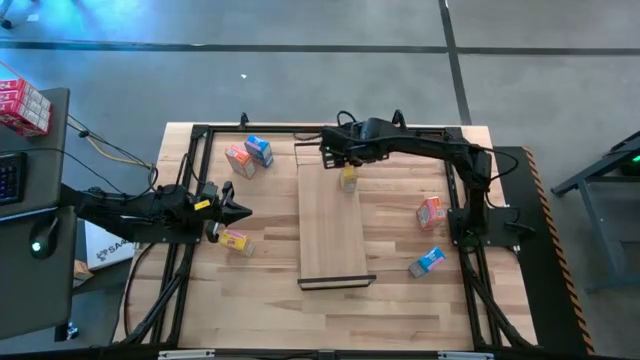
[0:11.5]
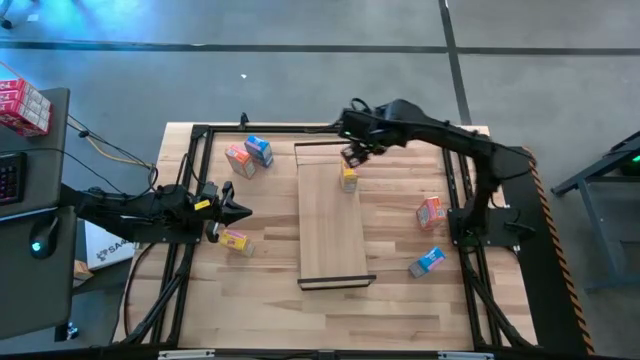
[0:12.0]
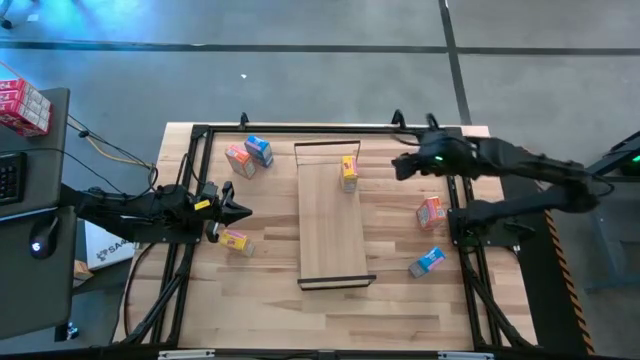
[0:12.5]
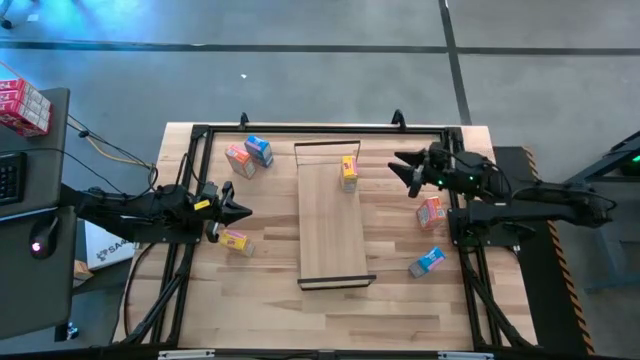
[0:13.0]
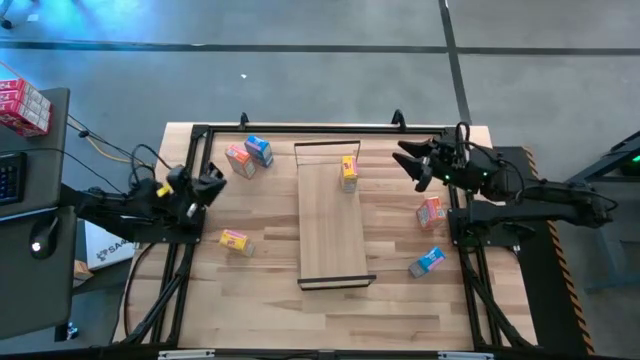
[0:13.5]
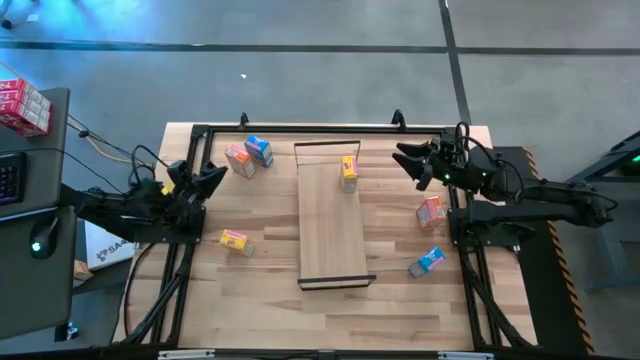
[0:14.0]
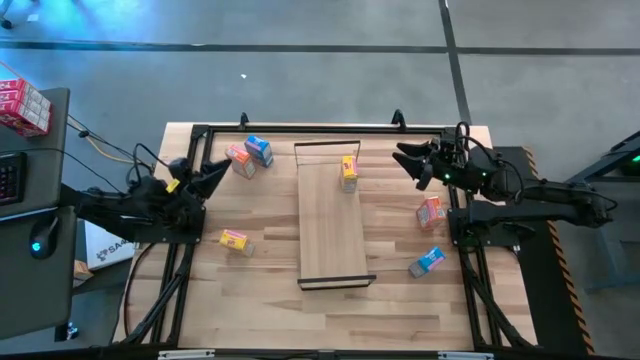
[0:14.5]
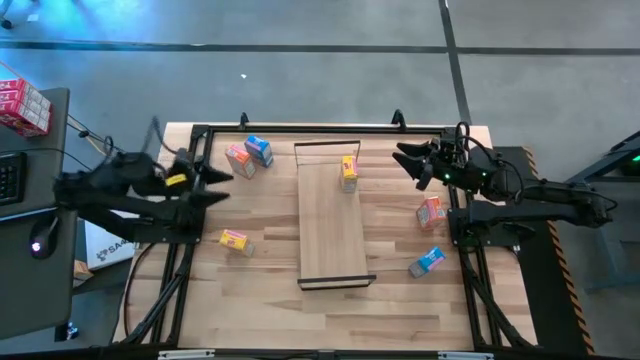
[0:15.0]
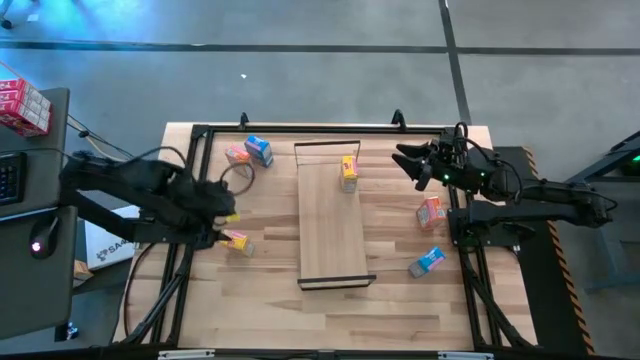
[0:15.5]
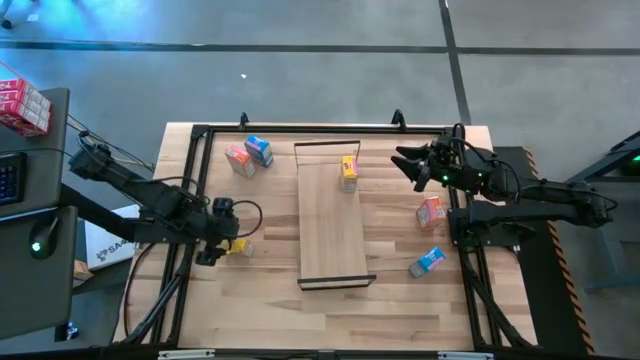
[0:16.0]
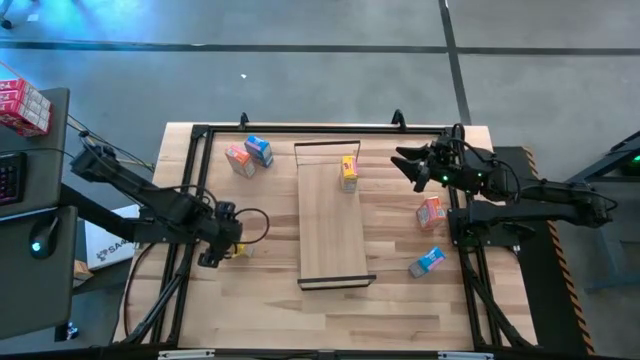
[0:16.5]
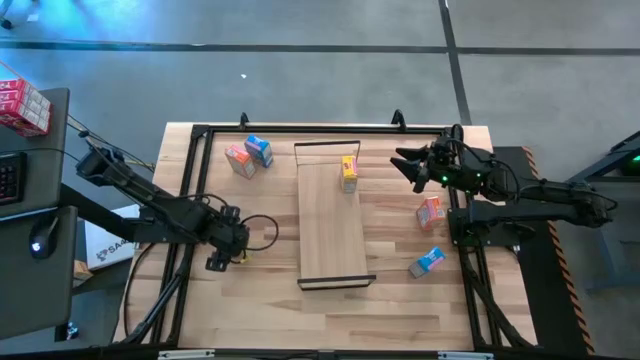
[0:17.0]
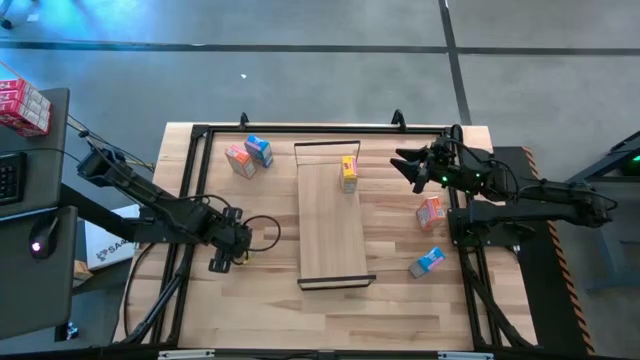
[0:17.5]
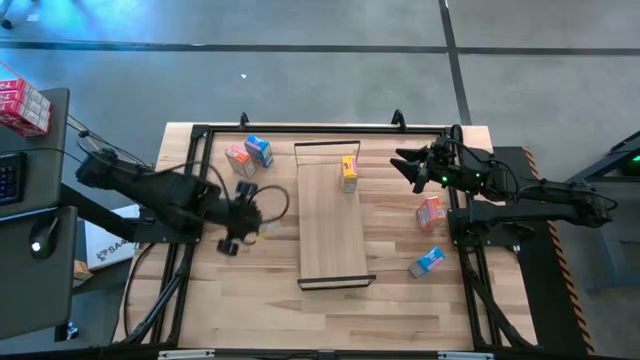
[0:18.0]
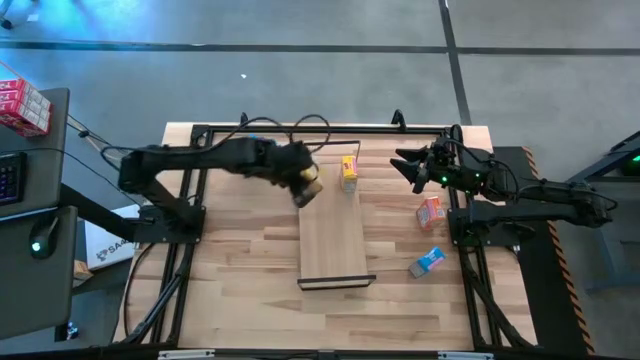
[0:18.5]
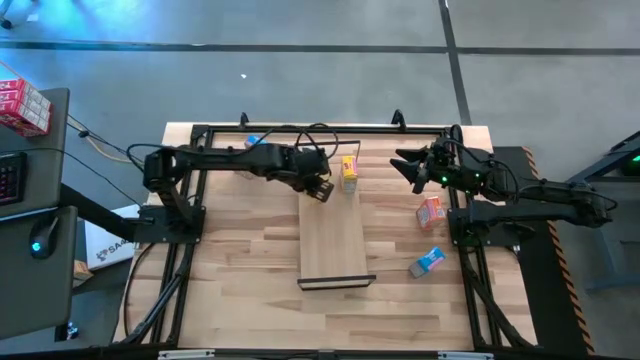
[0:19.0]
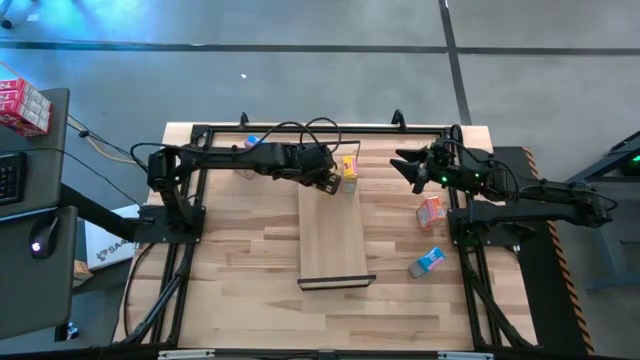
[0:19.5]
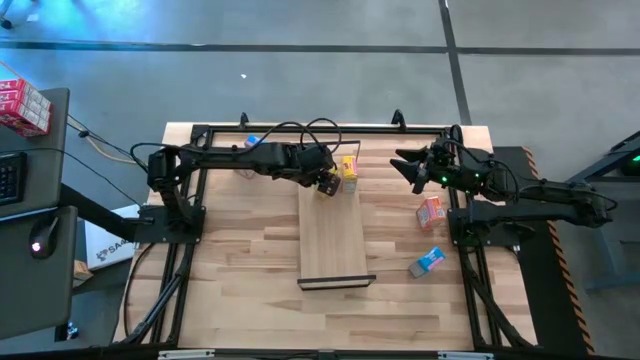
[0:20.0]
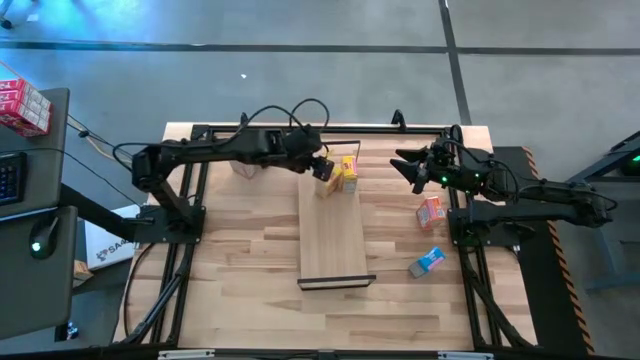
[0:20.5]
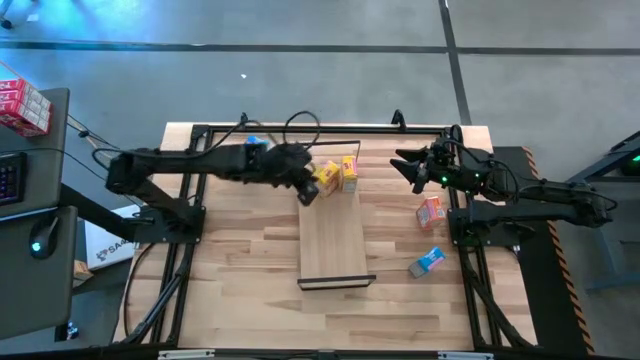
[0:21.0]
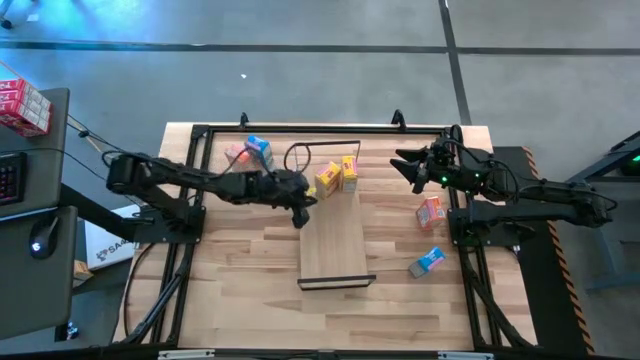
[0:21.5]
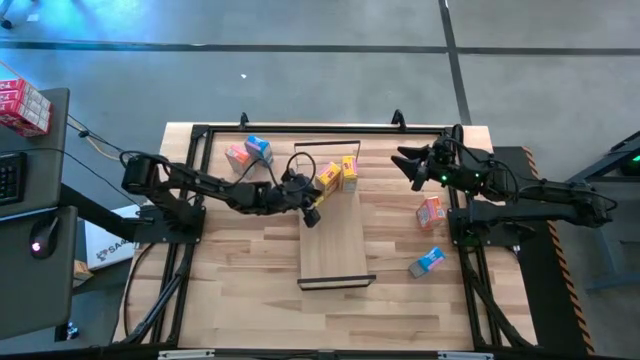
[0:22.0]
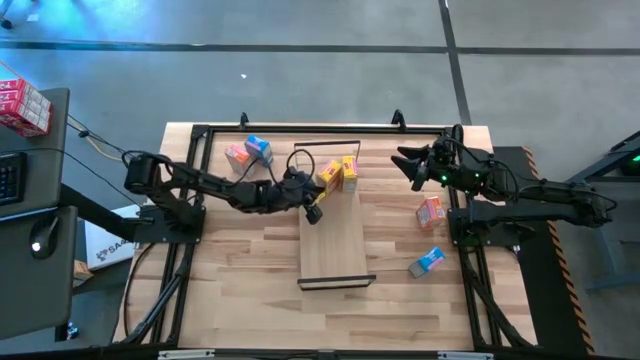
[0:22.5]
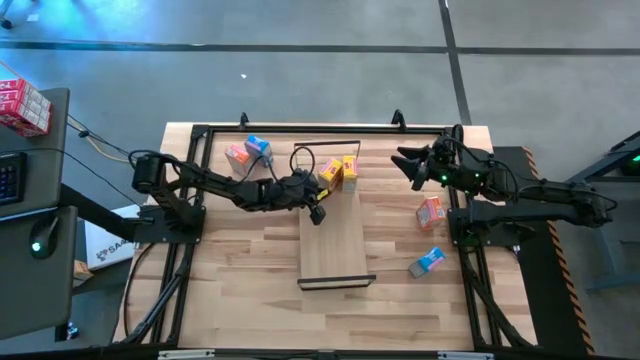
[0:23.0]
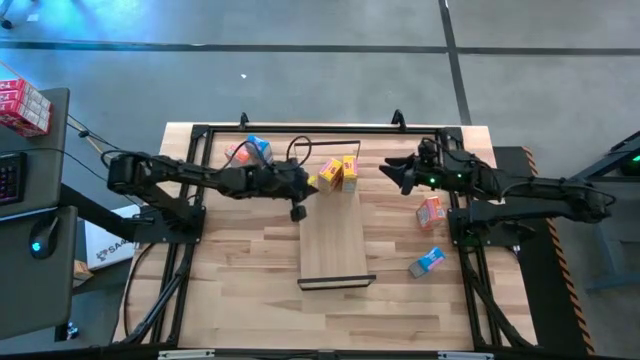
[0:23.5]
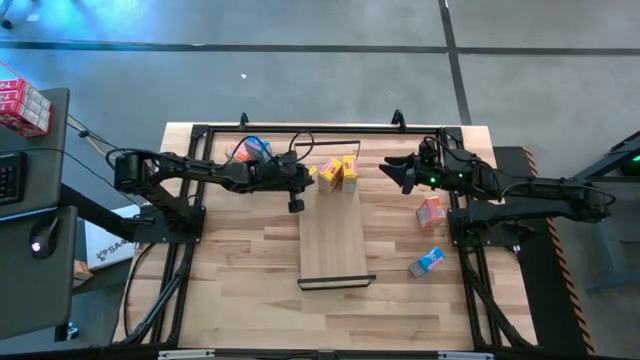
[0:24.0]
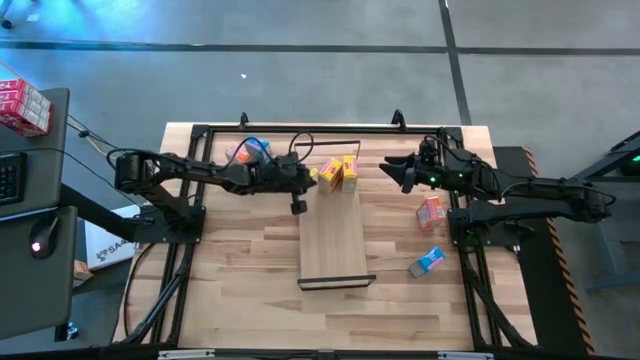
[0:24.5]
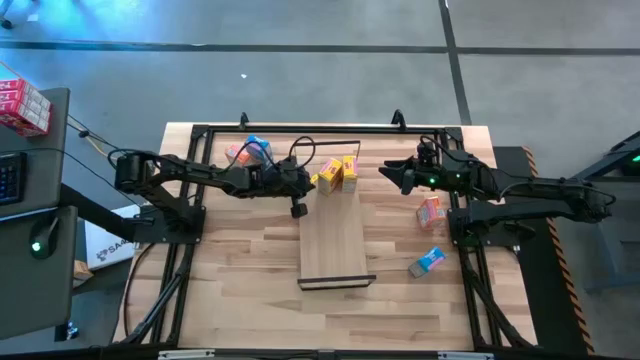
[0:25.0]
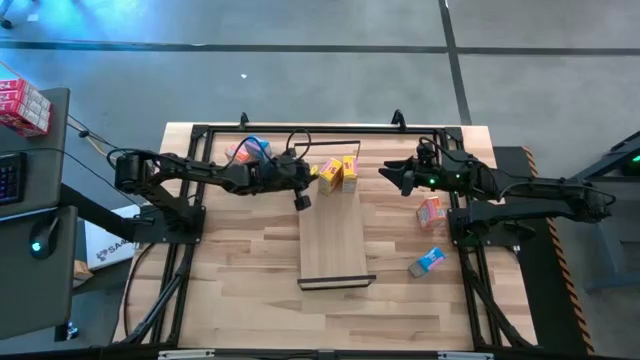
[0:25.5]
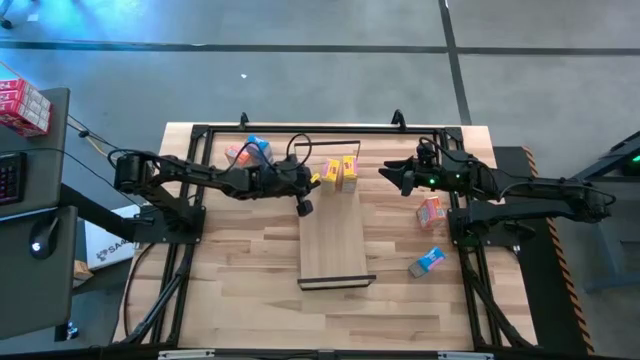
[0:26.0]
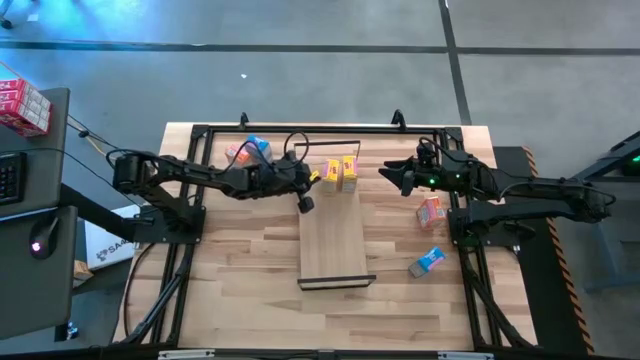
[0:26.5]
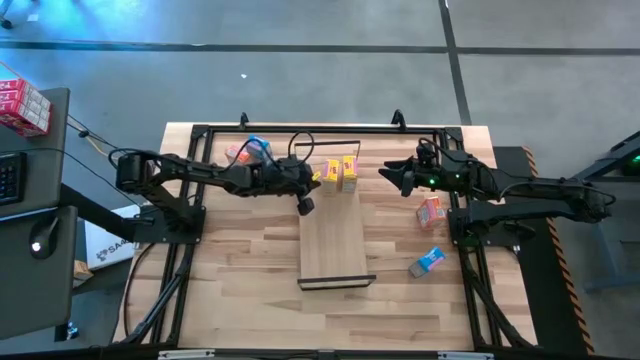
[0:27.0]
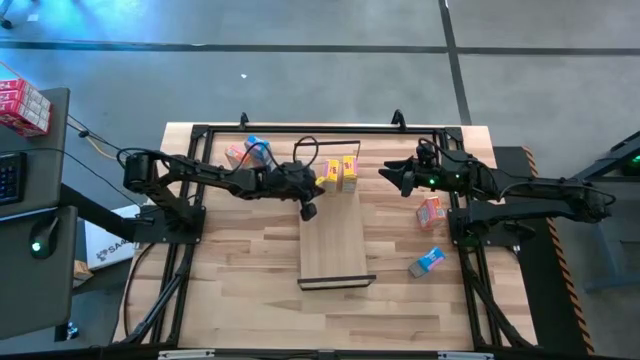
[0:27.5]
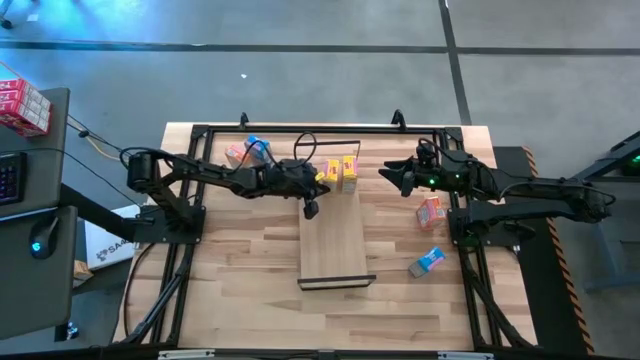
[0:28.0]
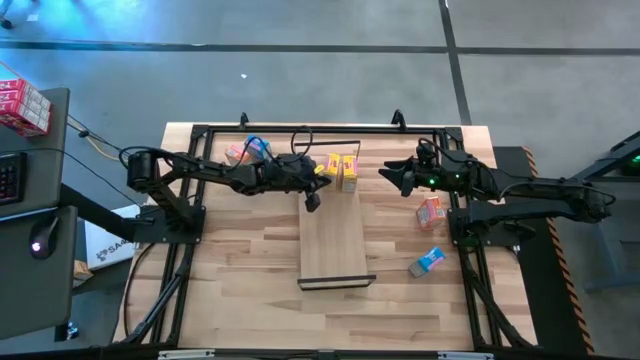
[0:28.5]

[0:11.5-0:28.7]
Task: Stack cereal on shelf
Stack the yellow cereal box on the shelf aligned with the other yellow cereal box

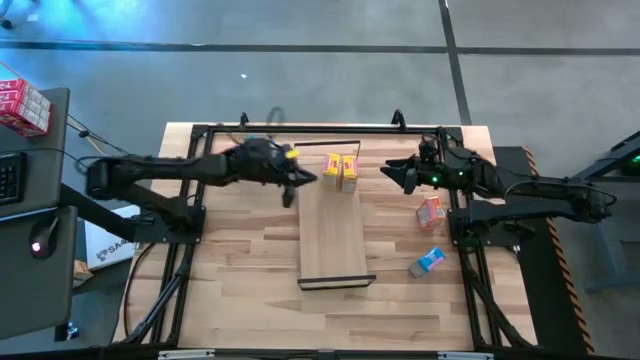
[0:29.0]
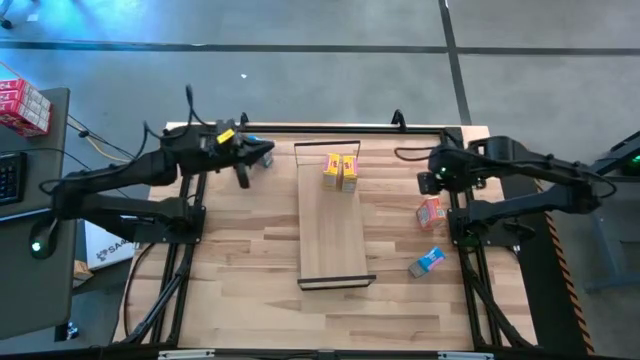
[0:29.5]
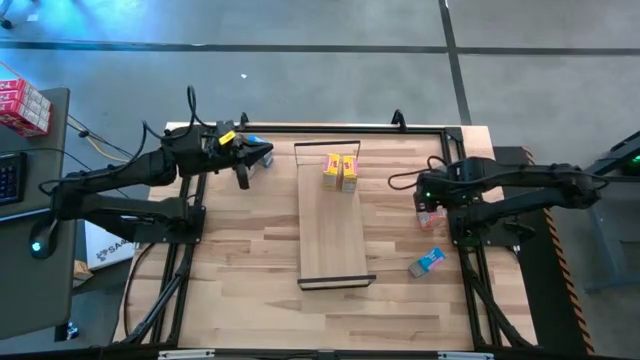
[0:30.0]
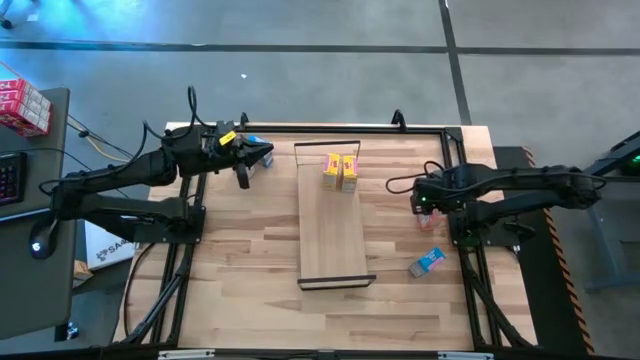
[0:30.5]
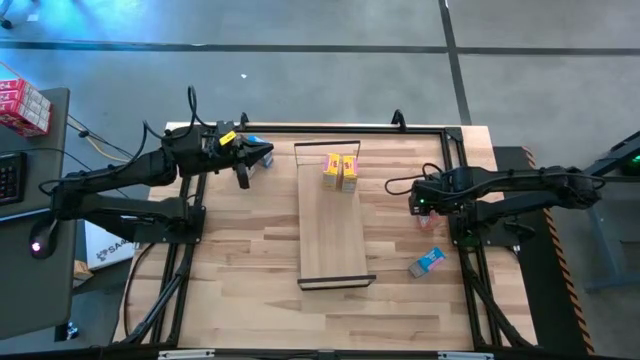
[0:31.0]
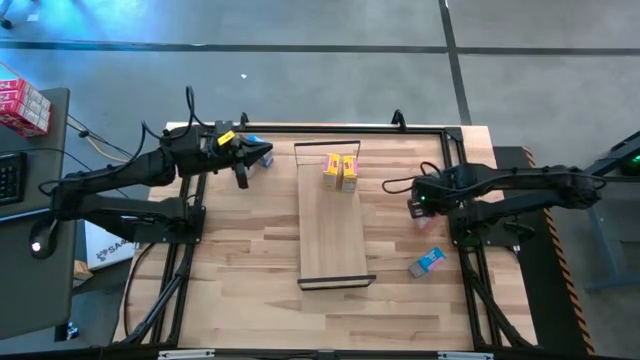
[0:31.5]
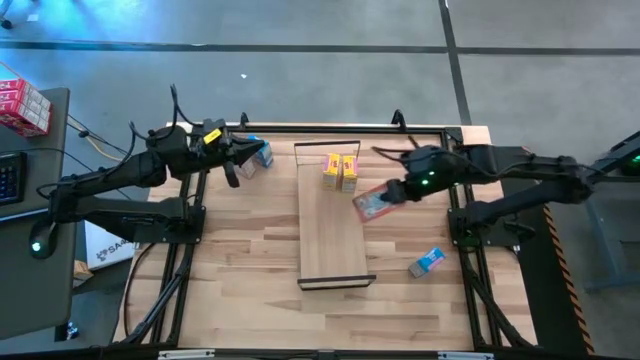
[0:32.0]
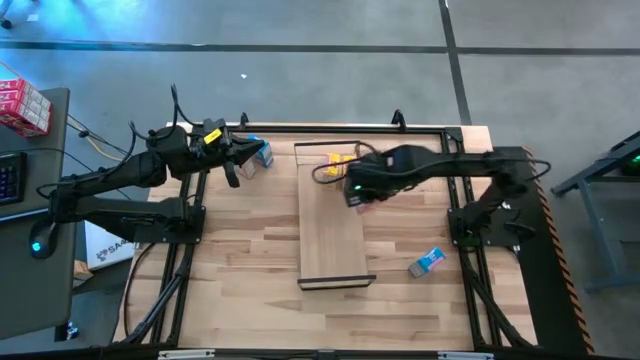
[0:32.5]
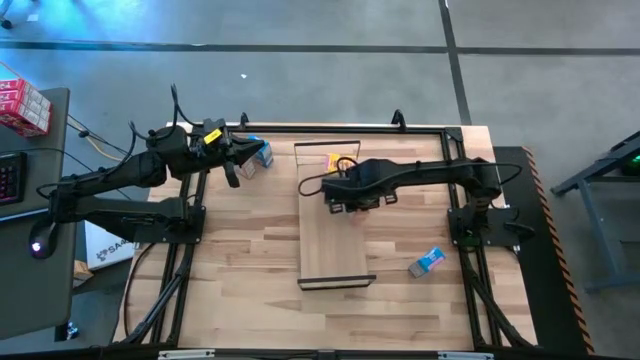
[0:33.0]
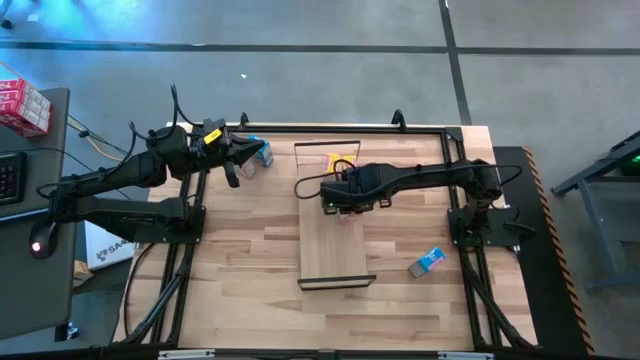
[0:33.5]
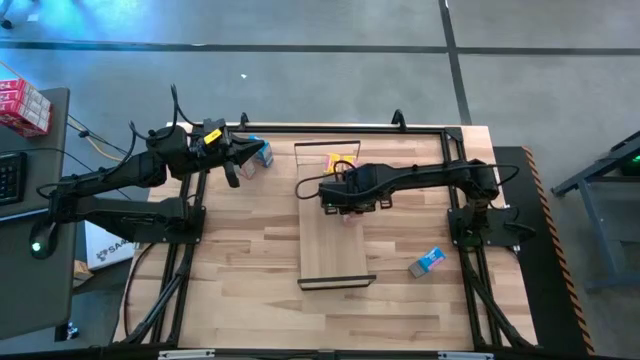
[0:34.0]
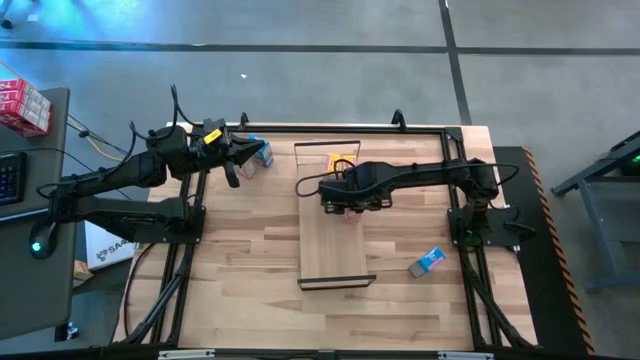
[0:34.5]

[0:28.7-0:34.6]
Stack the right orange cereal box on the shelf
